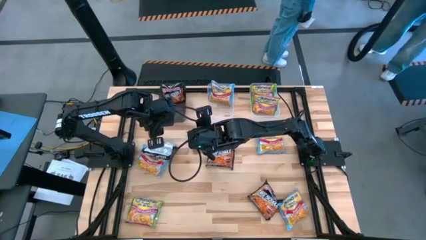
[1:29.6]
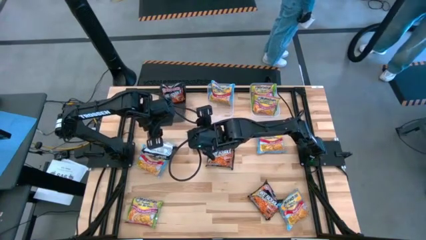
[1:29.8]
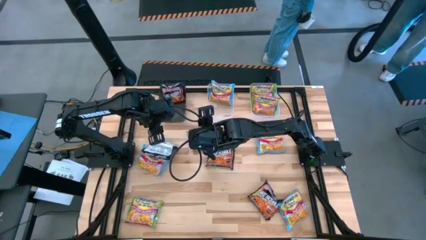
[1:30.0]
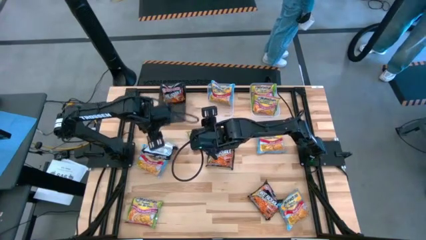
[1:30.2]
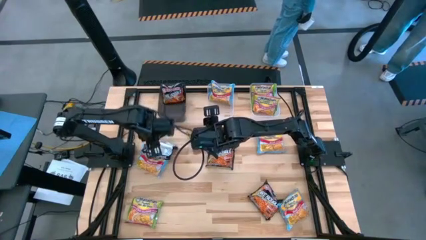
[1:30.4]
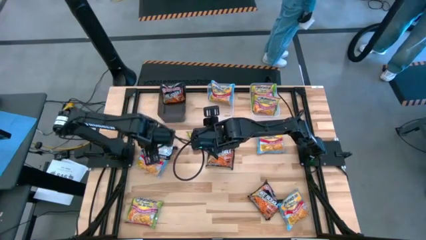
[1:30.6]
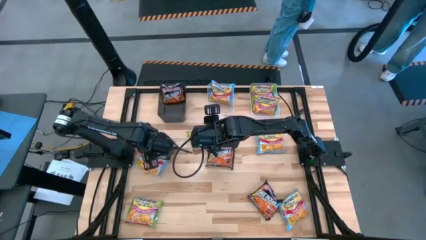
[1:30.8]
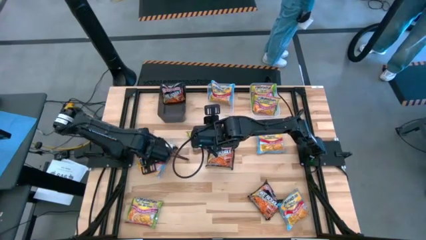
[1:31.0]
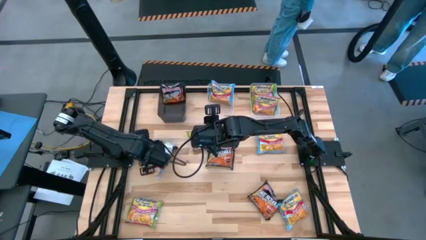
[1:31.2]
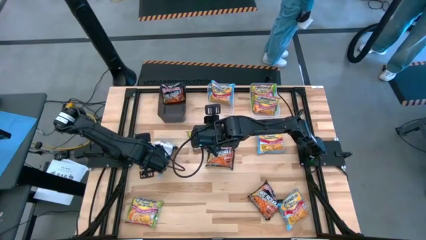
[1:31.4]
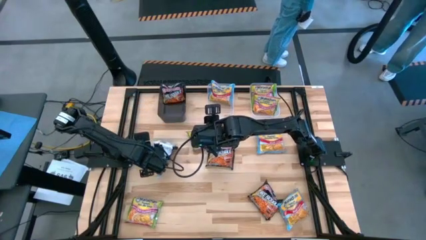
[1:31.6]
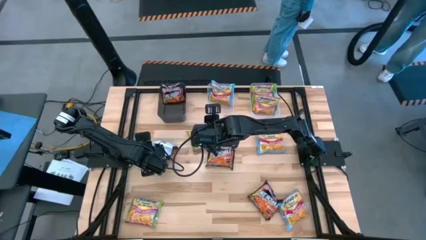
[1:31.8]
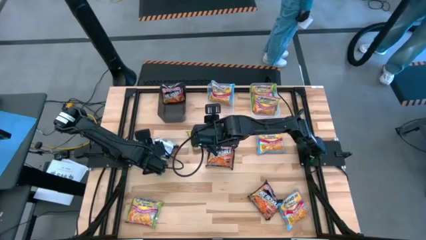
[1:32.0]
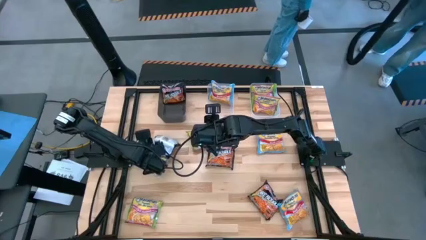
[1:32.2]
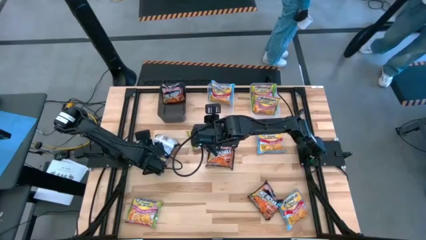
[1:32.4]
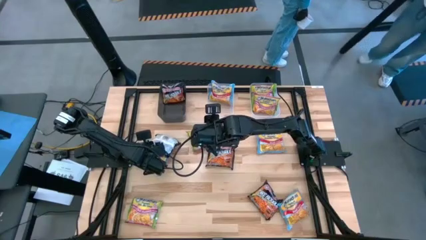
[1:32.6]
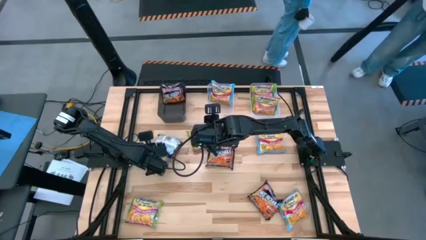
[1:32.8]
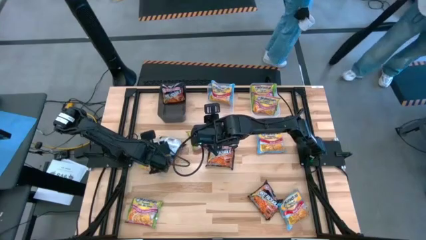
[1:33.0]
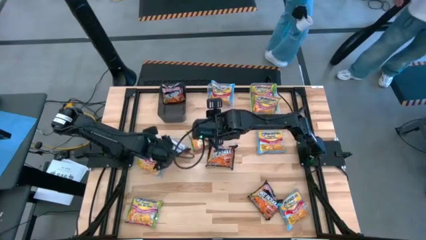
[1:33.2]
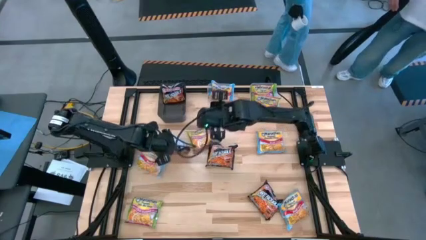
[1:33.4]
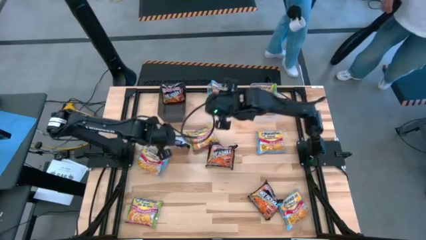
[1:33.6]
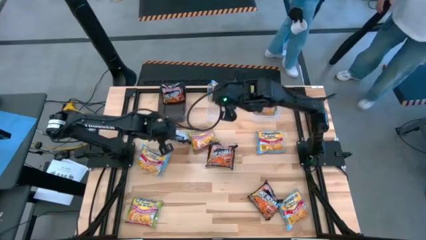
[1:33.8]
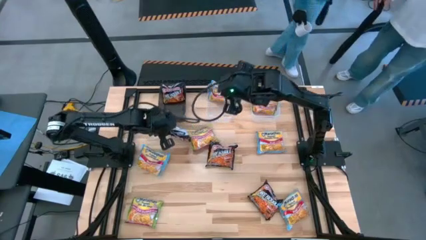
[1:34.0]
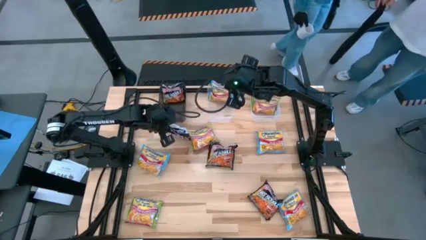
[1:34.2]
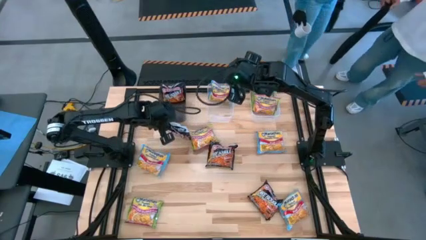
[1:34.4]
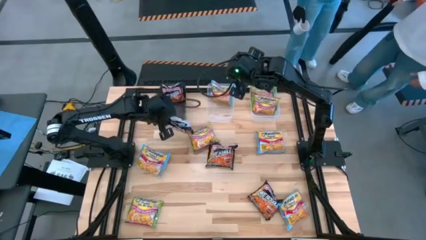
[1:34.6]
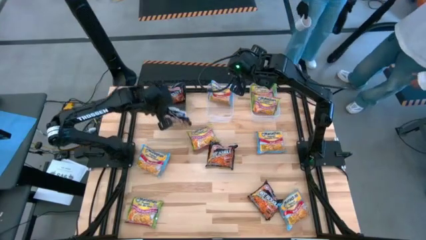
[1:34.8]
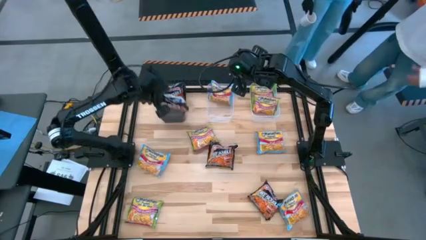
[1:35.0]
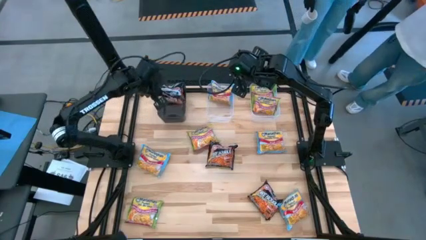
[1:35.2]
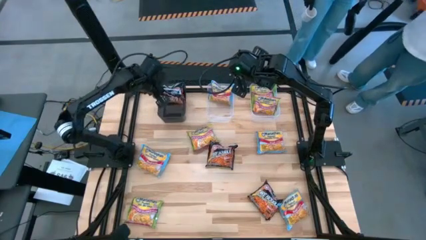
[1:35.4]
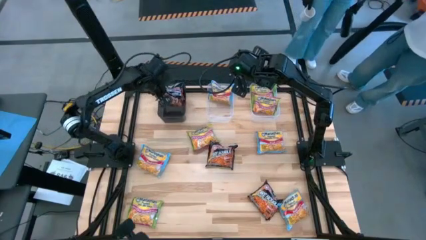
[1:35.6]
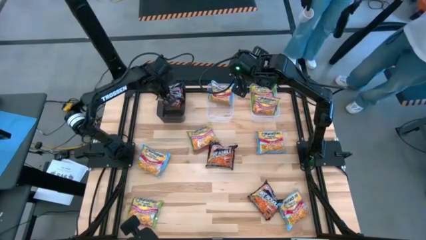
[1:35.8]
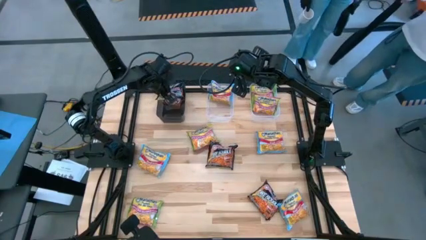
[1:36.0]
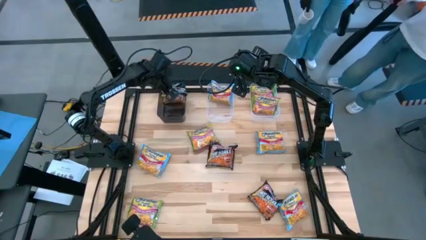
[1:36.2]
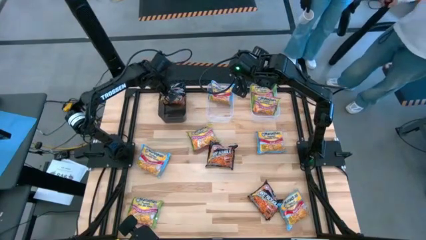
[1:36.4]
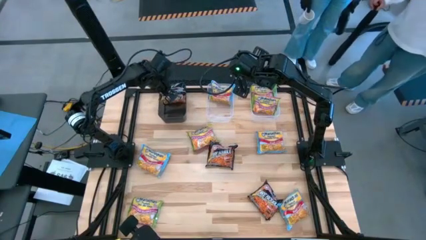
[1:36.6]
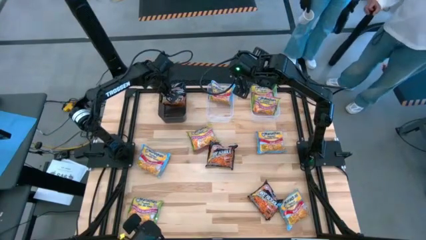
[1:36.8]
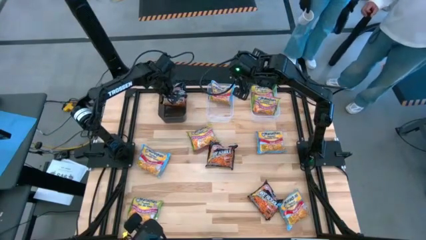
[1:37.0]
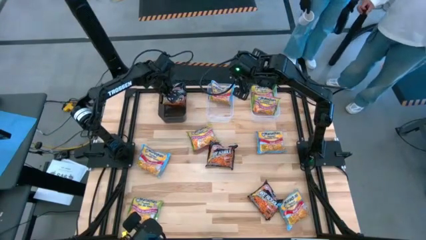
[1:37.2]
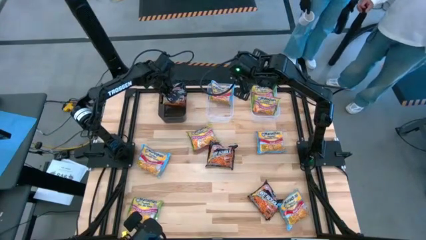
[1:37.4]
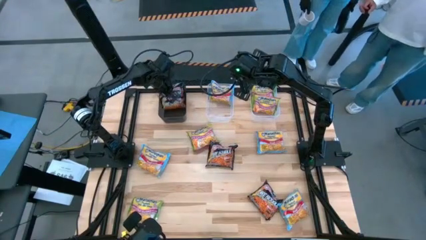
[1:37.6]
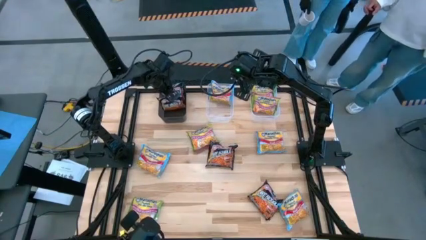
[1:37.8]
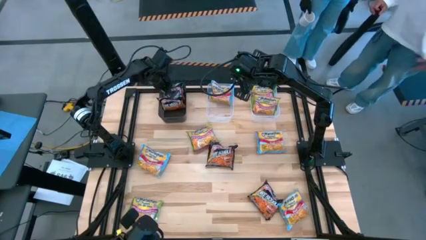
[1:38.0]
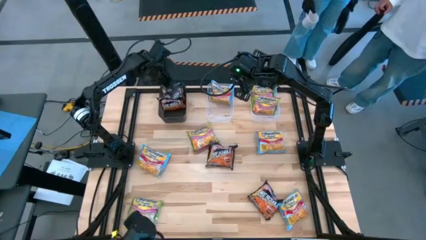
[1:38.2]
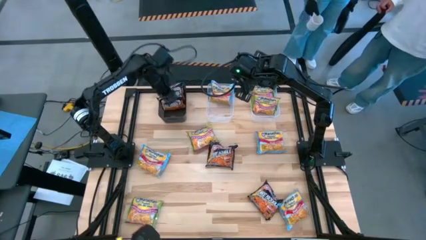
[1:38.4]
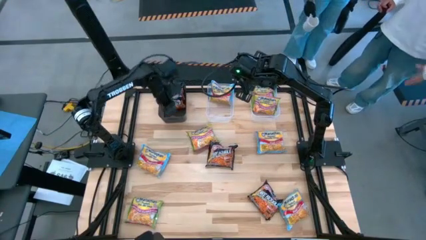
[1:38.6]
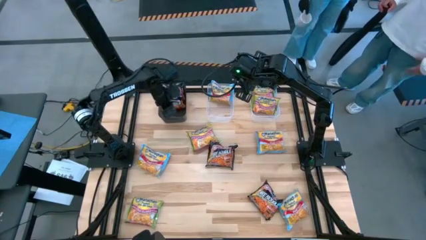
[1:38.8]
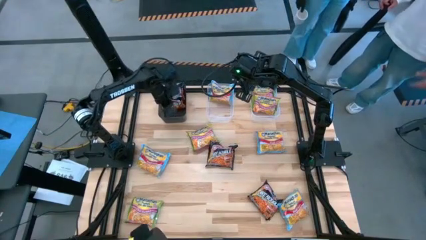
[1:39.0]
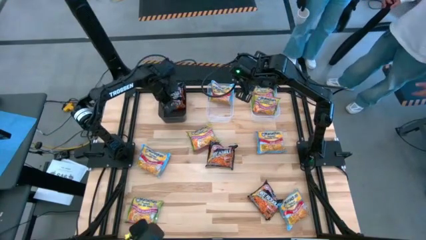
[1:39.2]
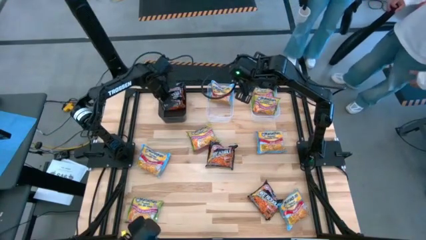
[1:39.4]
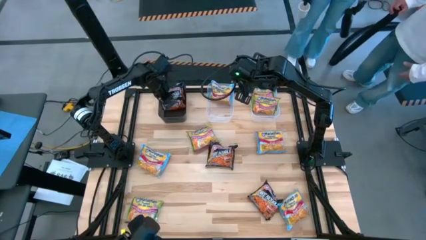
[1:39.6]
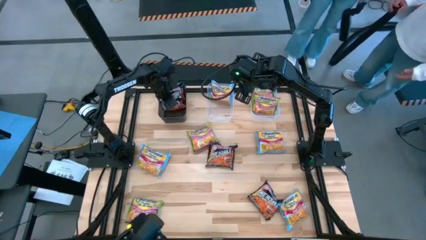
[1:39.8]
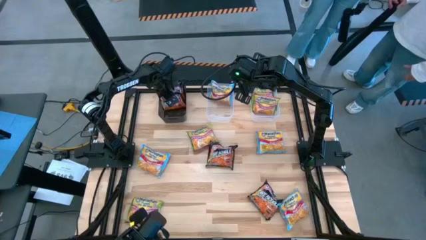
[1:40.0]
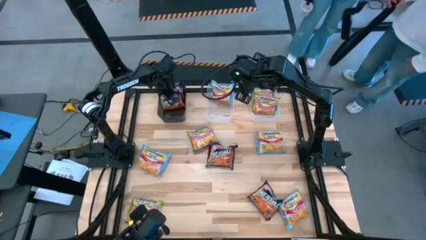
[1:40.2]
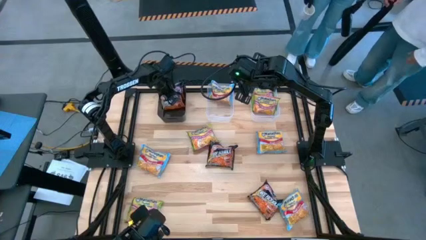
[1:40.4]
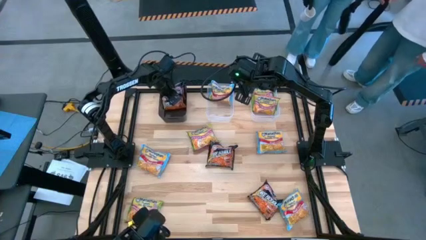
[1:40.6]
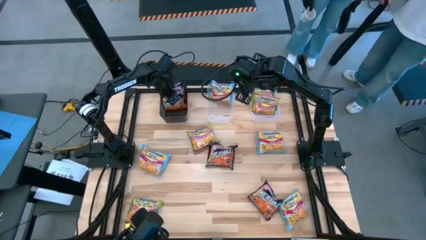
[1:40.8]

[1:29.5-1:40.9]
Task: Sort Maruchan noodles
Put the bottom left black noodle pack into the black bin

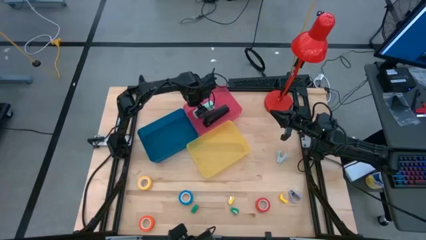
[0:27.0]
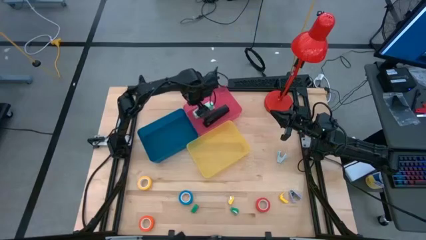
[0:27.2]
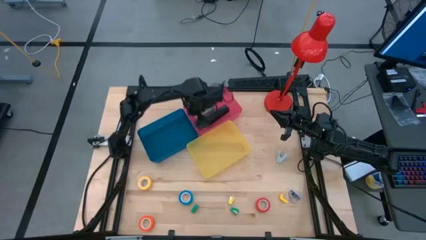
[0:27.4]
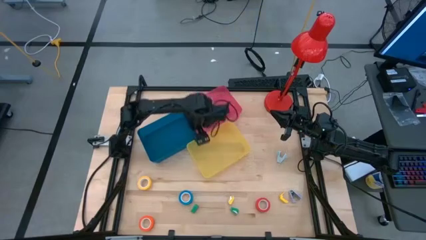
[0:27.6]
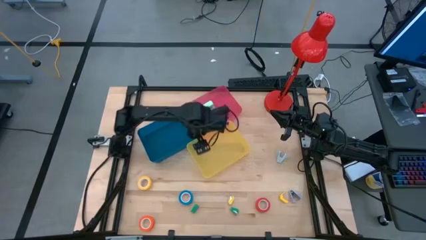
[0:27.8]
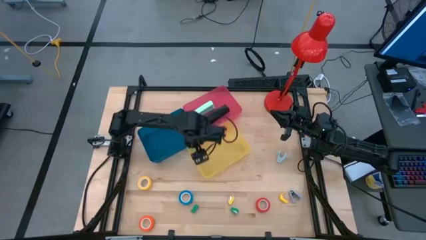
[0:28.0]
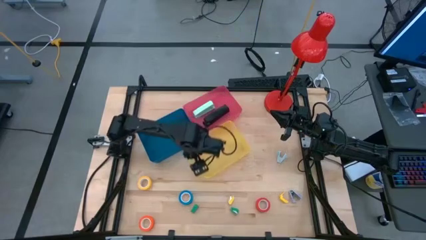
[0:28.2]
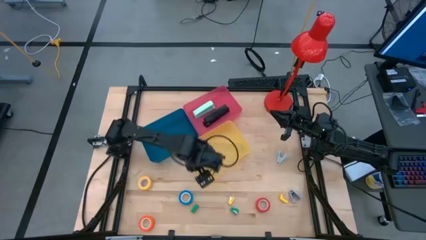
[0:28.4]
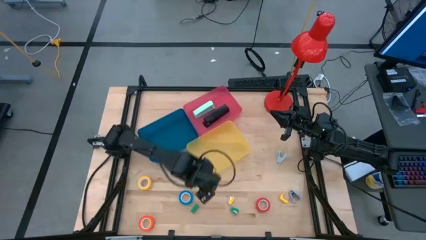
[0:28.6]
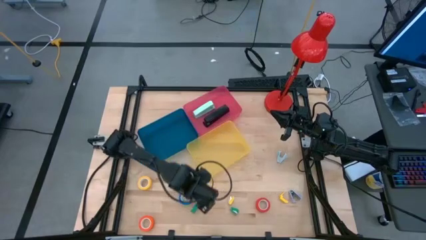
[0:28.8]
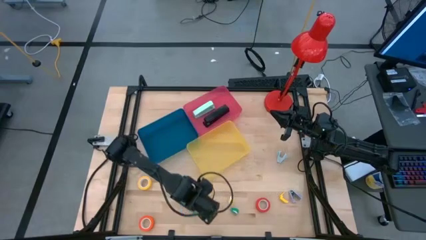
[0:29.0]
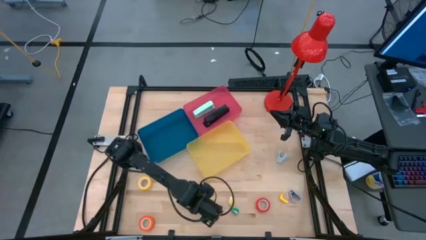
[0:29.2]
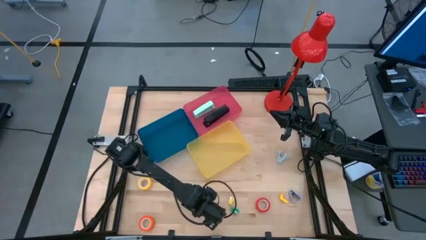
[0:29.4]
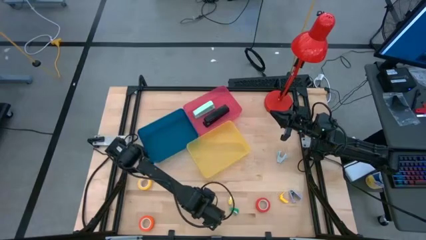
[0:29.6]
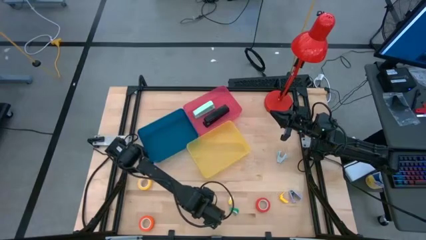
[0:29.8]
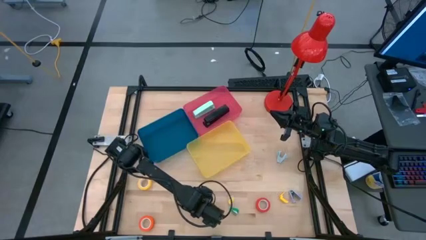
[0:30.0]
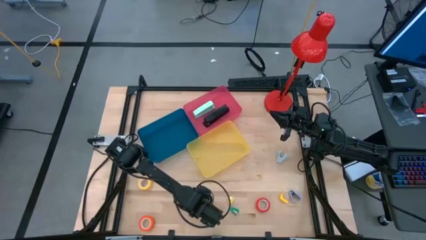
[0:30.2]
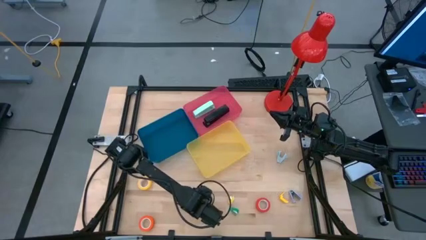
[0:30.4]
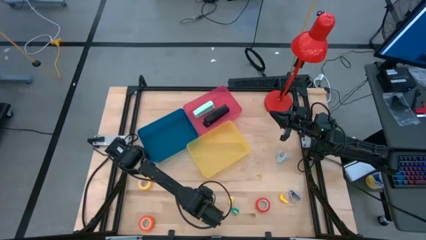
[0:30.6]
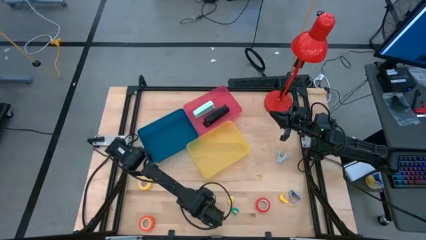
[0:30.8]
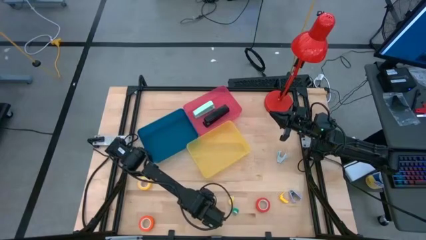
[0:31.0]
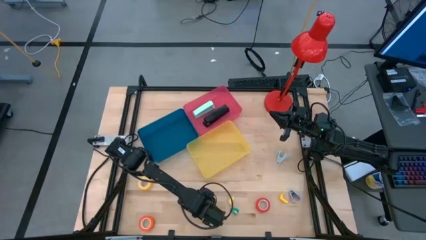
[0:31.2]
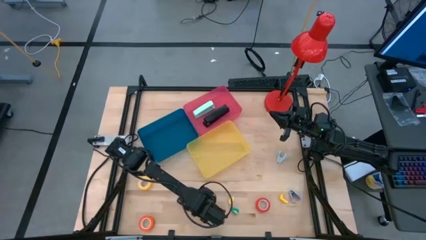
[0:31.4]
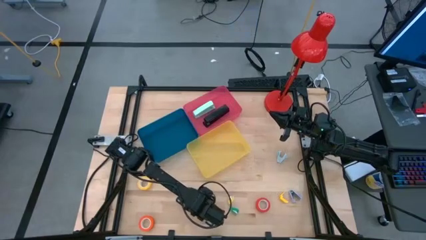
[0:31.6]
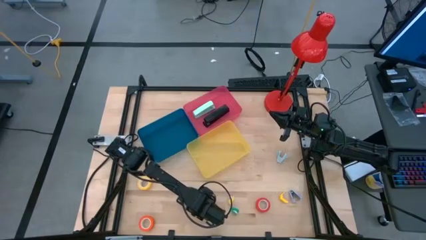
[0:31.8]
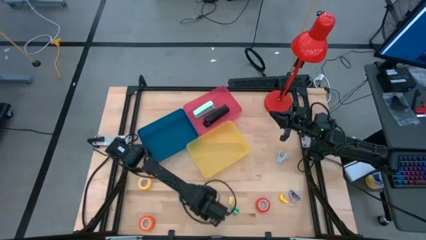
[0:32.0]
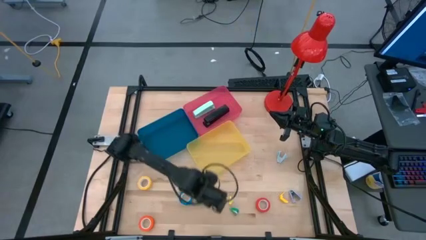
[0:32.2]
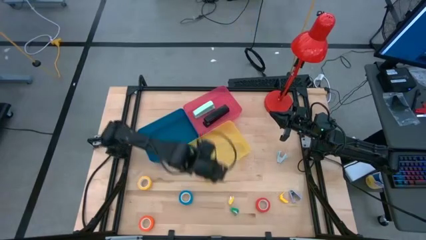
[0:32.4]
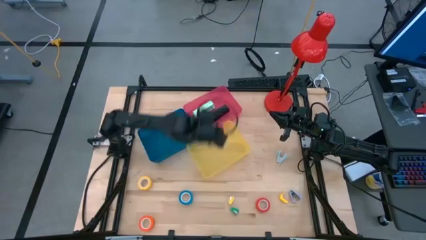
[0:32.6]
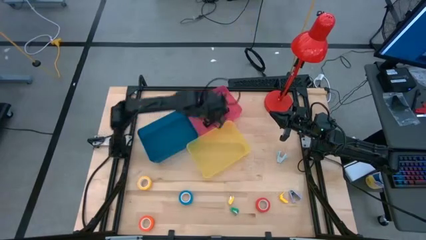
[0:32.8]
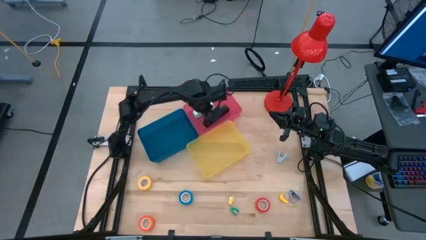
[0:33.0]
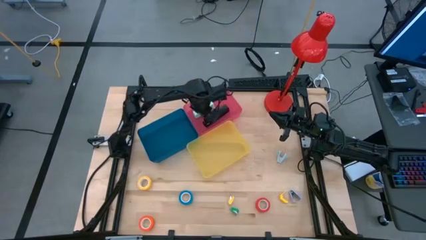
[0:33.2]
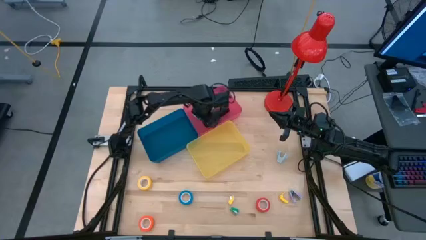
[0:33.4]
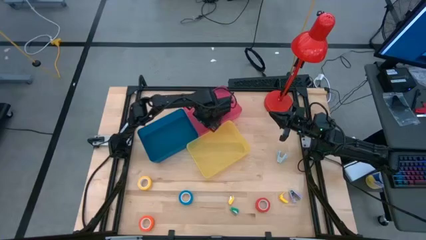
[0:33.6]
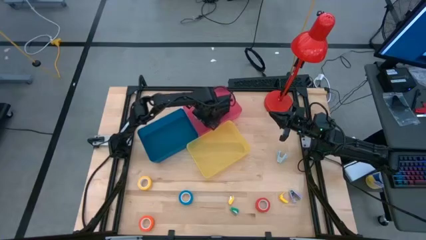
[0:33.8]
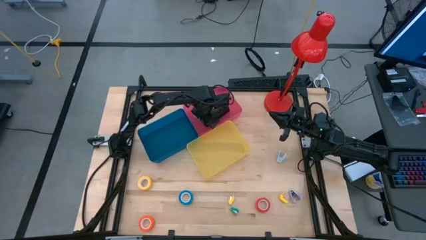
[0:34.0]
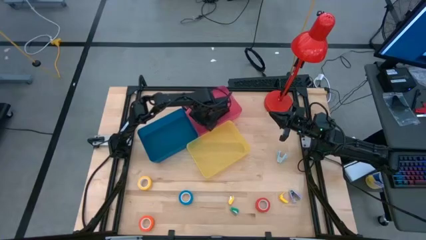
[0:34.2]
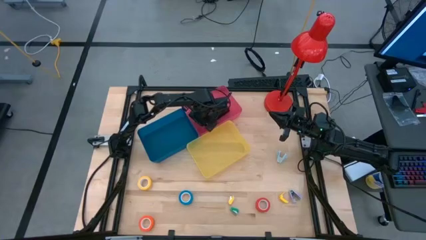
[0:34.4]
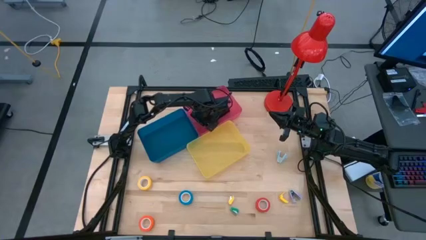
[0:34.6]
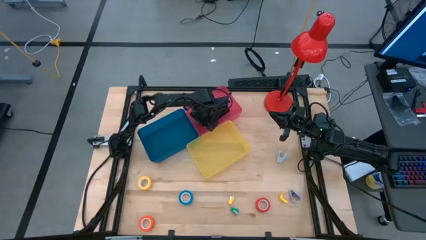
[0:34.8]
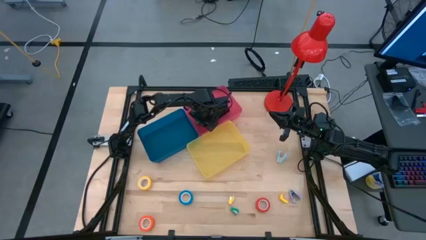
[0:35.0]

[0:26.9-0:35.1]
Task: Pick and place Stapler, Stapler remover, tape
Put the left green stapler into the red bin
